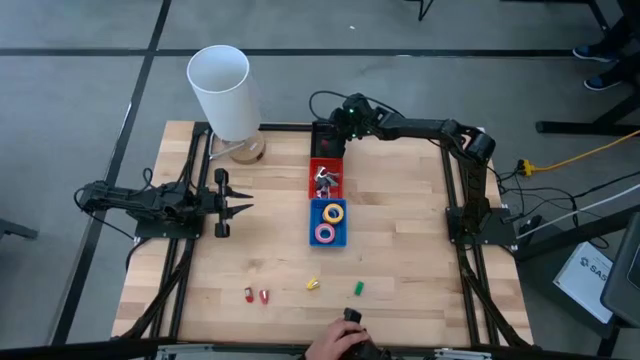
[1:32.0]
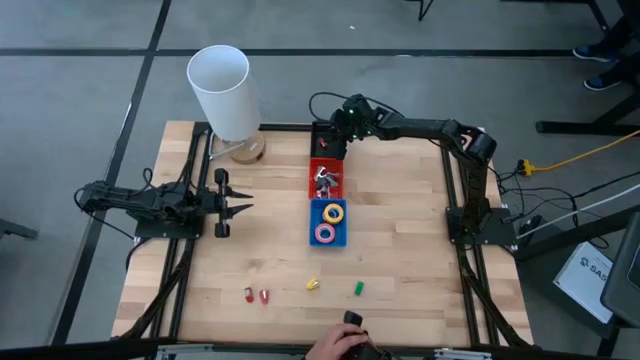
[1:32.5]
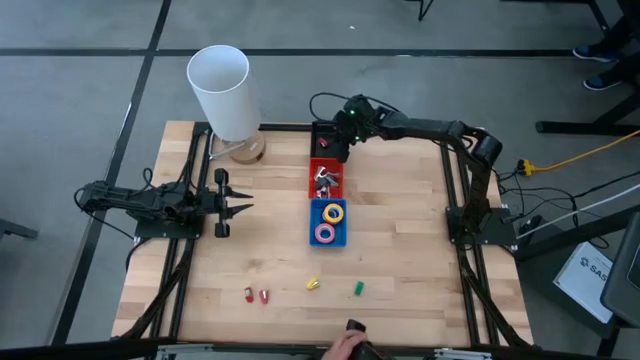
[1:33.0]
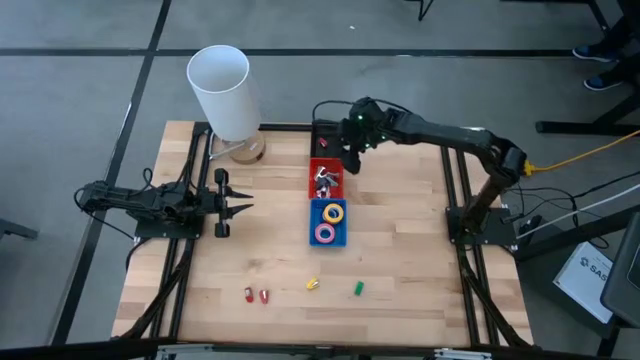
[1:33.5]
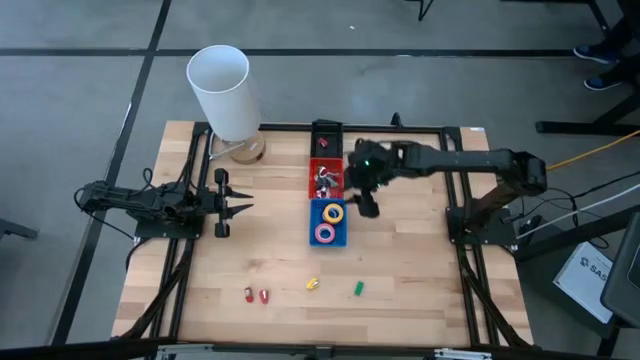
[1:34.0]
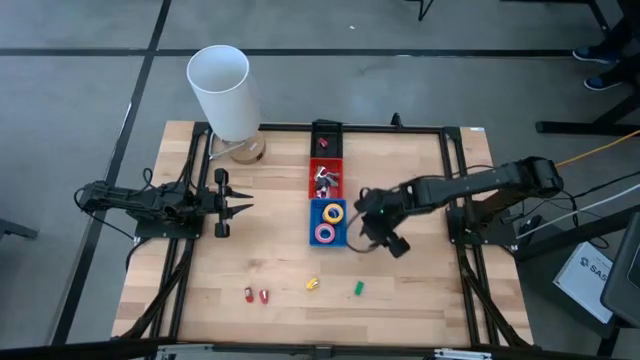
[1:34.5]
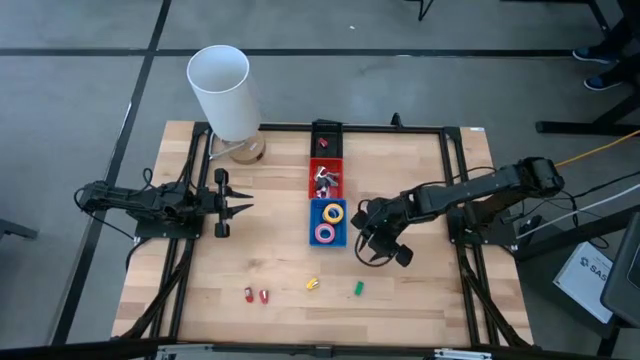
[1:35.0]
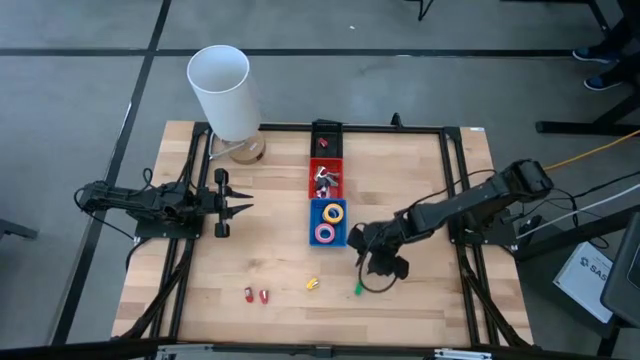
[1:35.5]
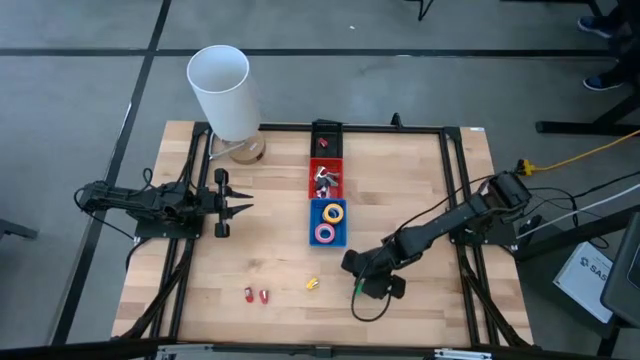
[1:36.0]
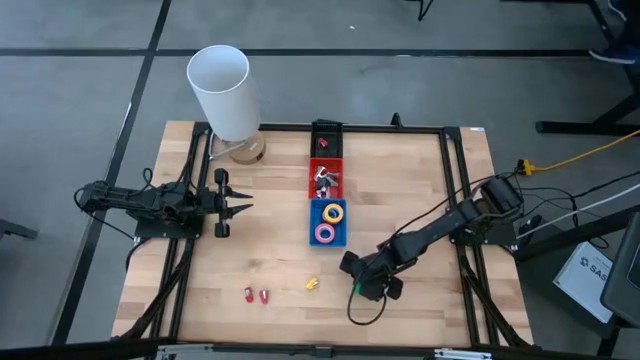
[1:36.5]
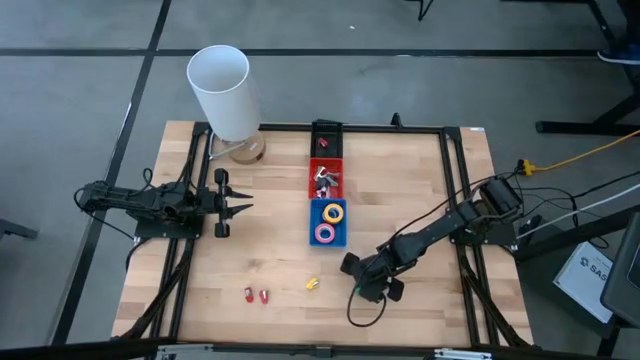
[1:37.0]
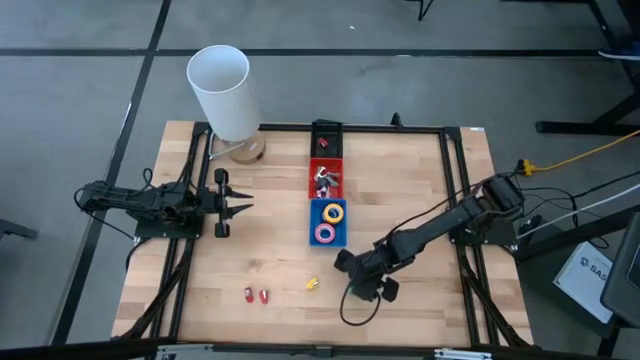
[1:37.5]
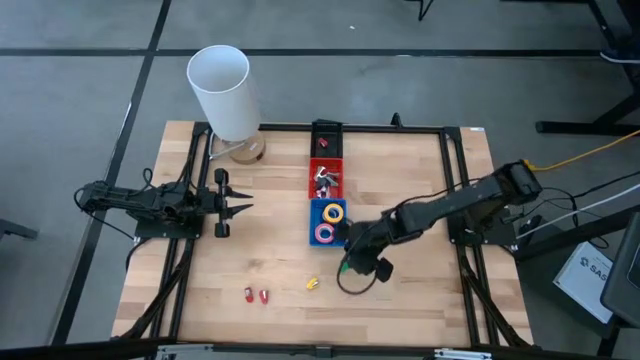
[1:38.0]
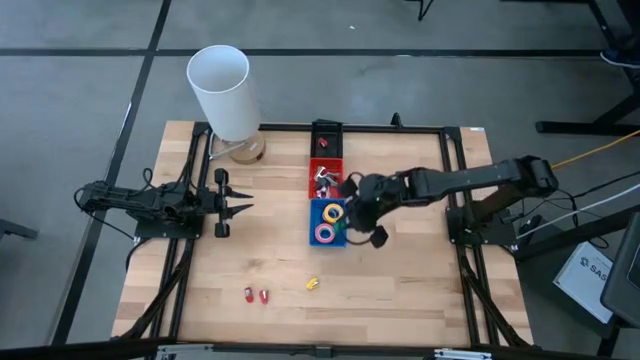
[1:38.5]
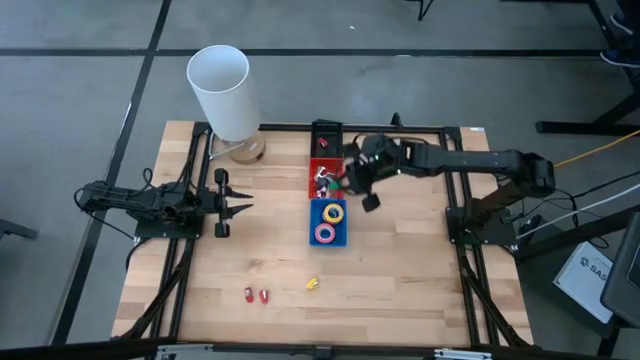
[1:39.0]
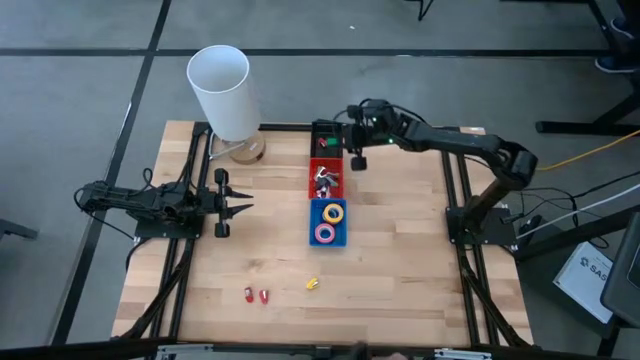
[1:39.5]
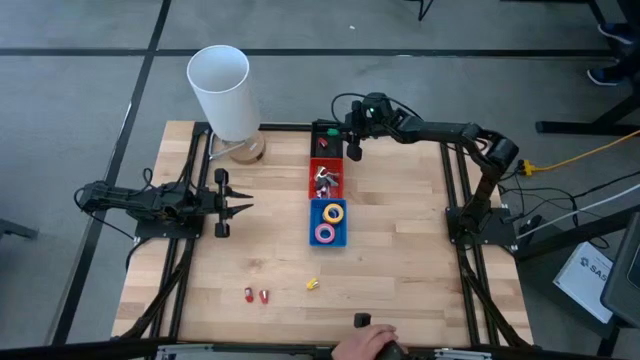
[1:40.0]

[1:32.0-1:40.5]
Task: Pick and place Stapler, Stapler remover, tape
Put the green stapler into the black bin

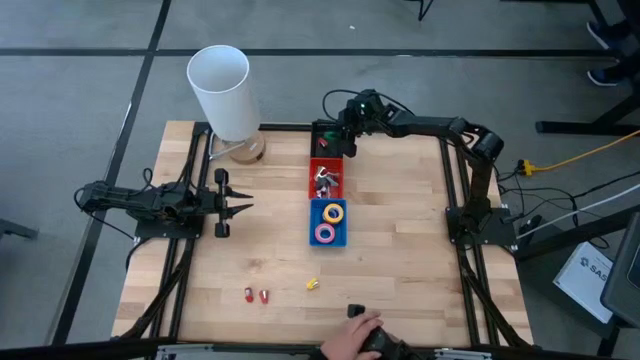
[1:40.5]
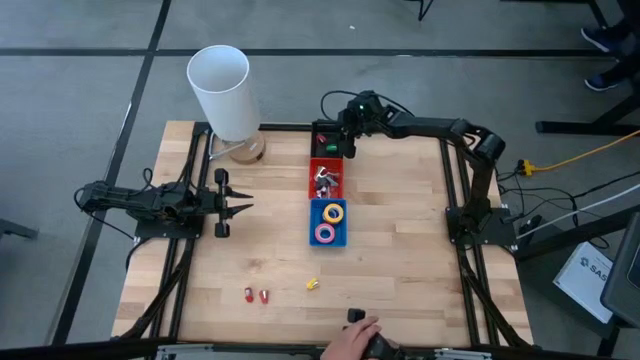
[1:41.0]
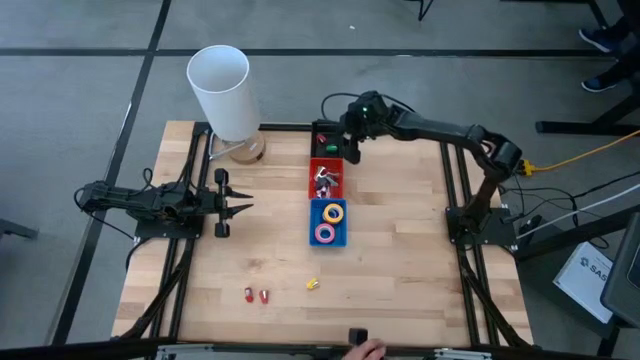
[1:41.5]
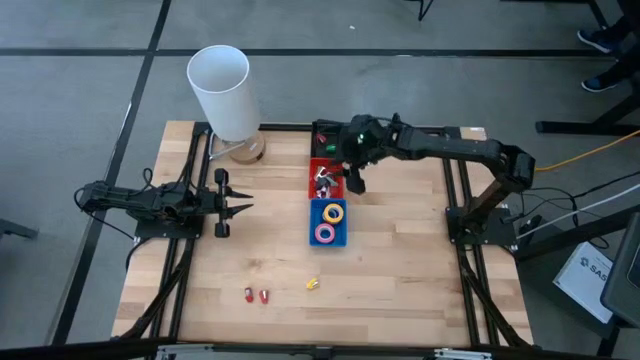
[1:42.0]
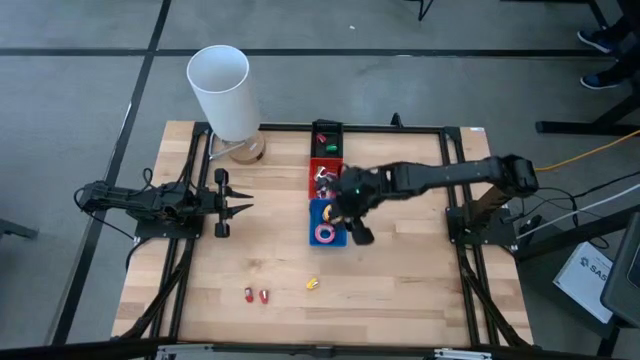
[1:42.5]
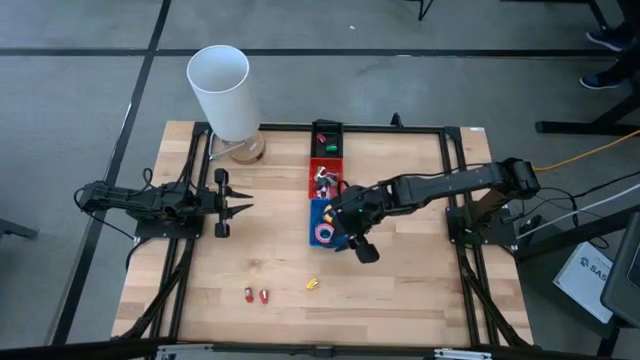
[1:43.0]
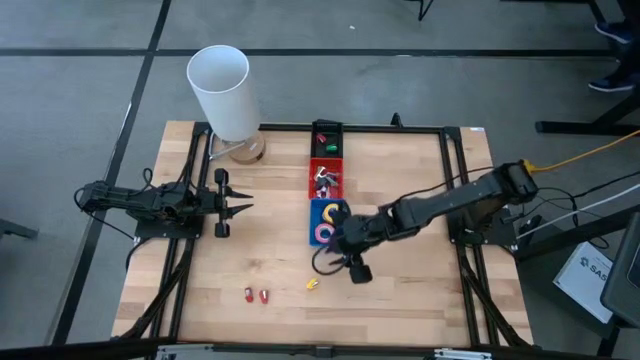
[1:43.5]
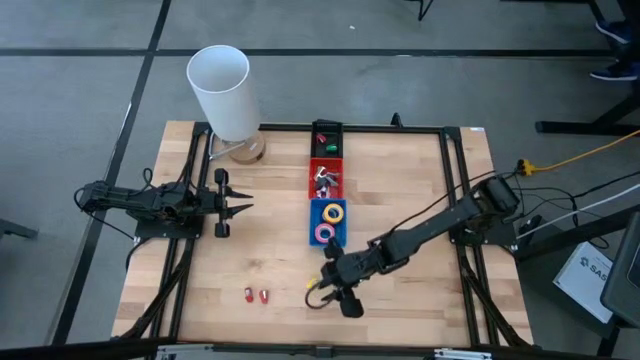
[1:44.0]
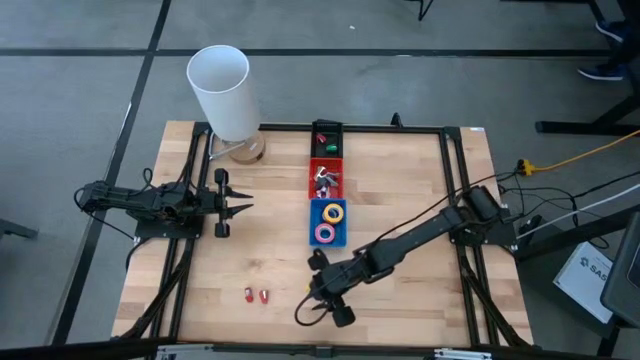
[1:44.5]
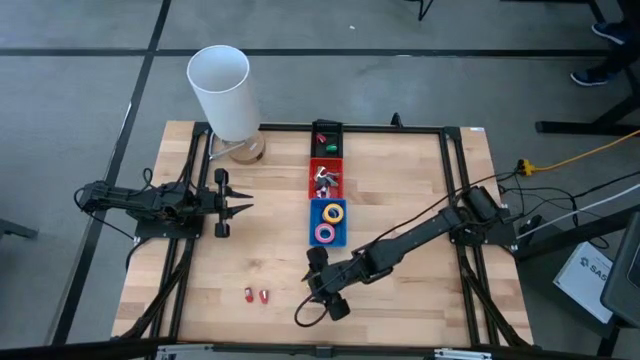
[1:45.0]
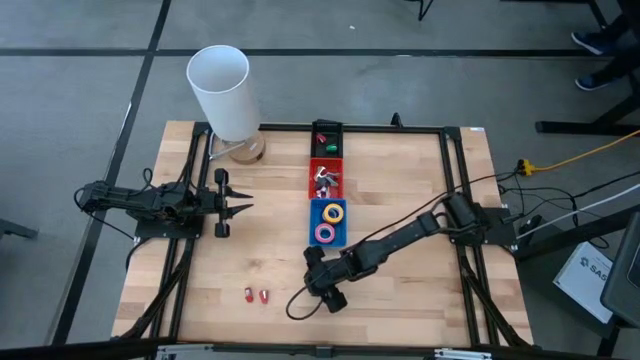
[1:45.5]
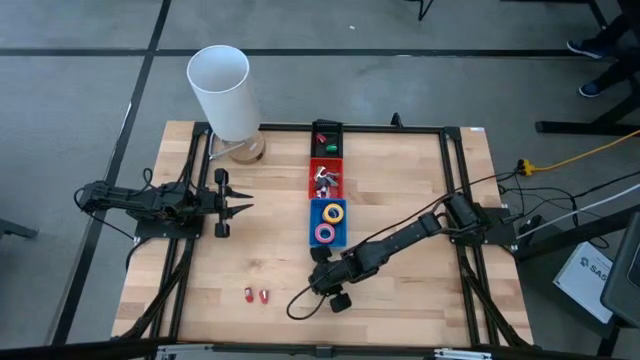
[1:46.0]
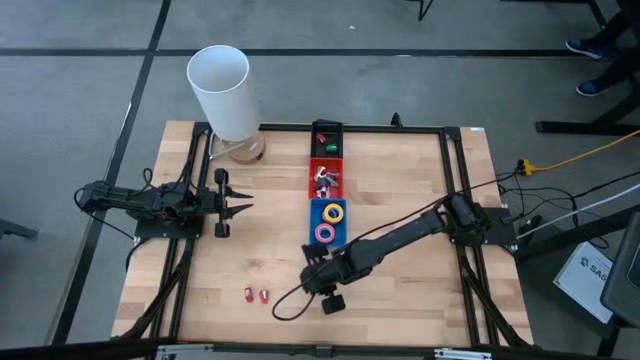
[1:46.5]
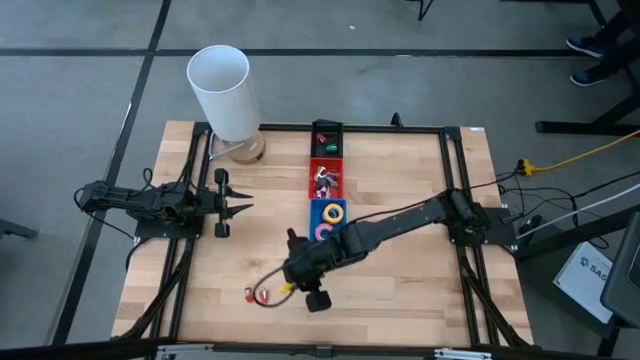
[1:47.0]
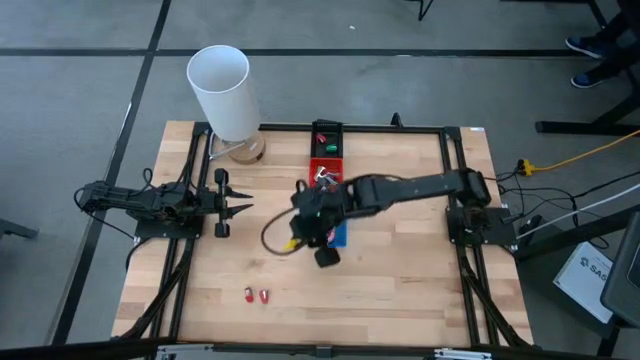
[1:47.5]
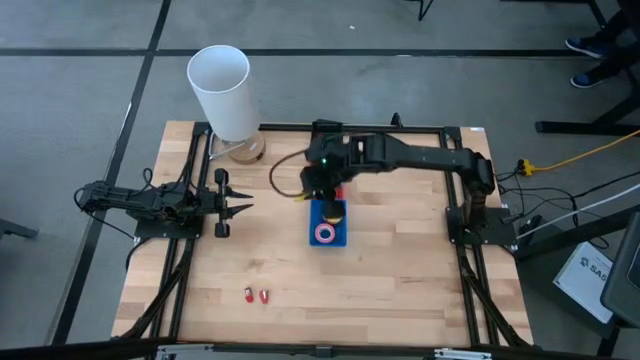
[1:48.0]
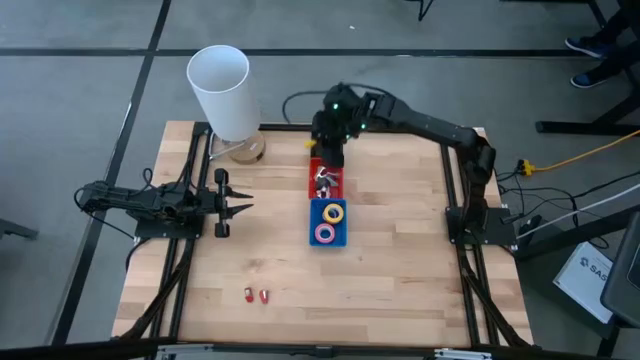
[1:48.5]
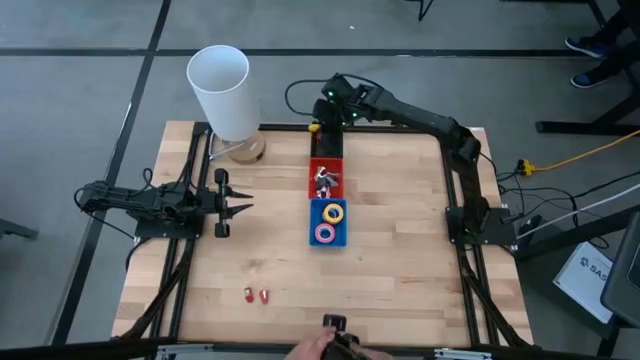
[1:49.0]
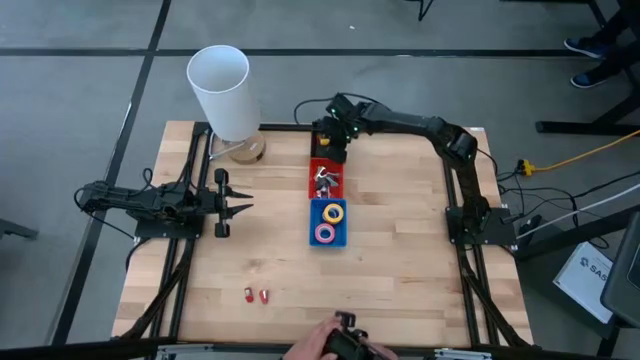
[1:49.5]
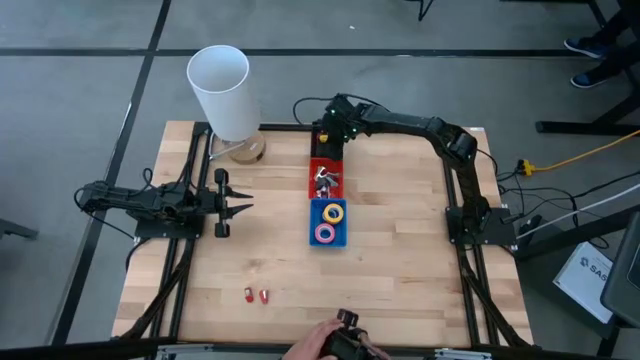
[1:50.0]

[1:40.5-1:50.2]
Put the yellow stapler into the black bin

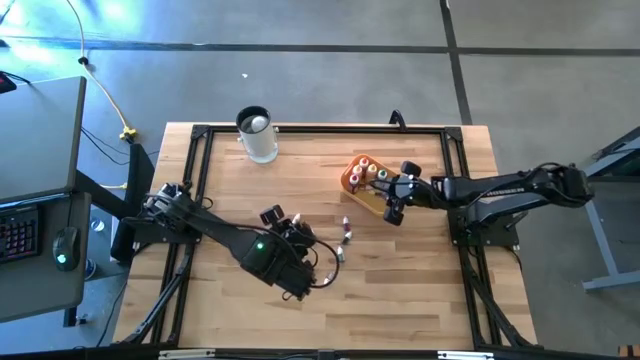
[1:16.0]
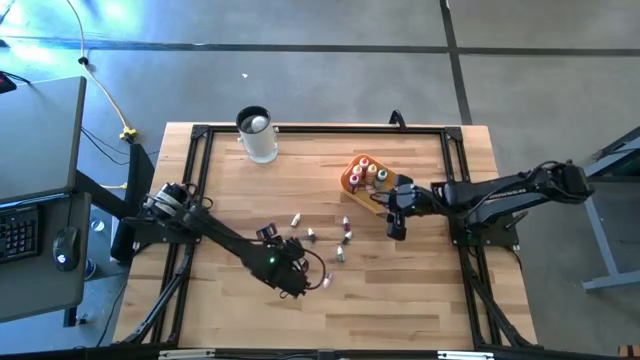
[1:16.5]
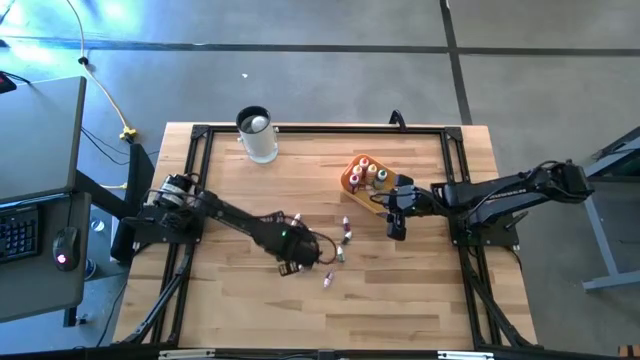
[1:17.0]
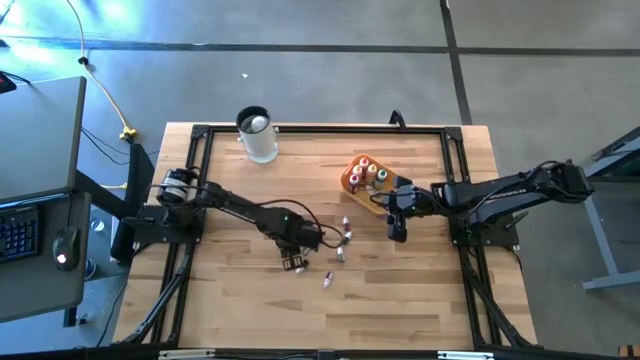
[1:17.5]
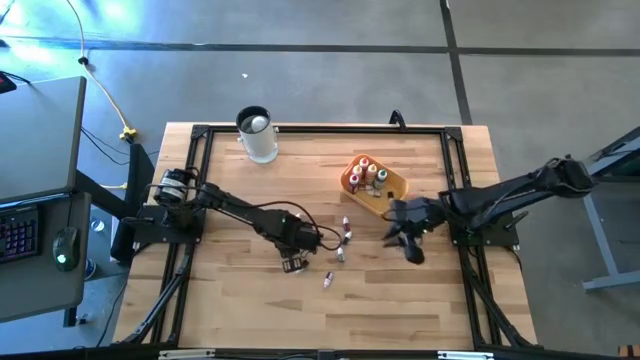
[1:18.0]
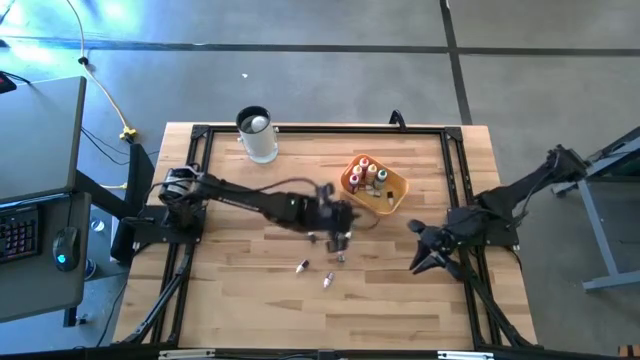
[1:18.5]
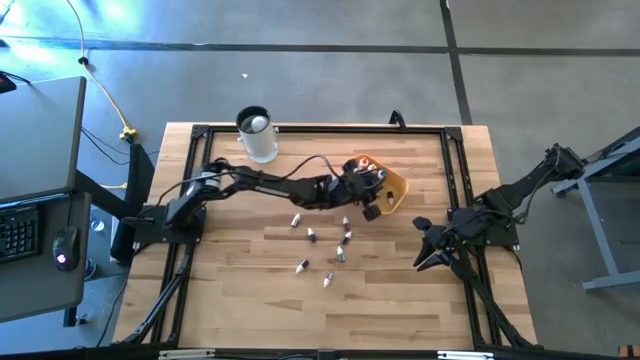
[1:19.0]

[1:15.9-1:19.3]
Task: Pick & Place food coloring
Put the small pink food coloring bottle into the yellow bin
